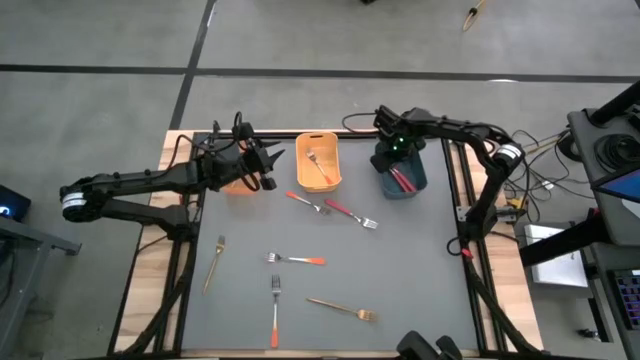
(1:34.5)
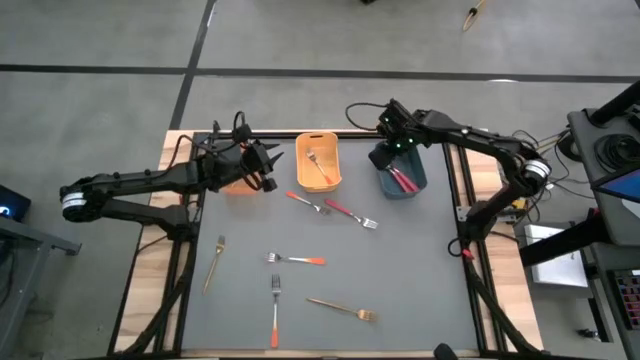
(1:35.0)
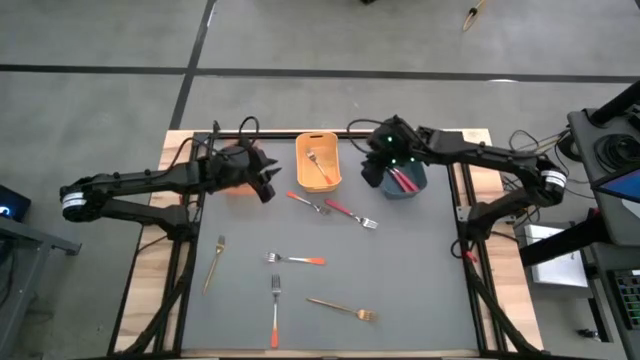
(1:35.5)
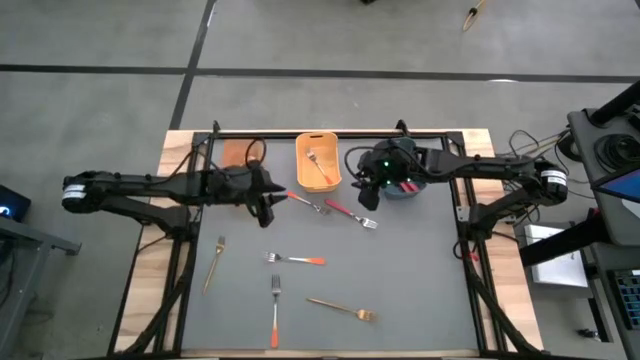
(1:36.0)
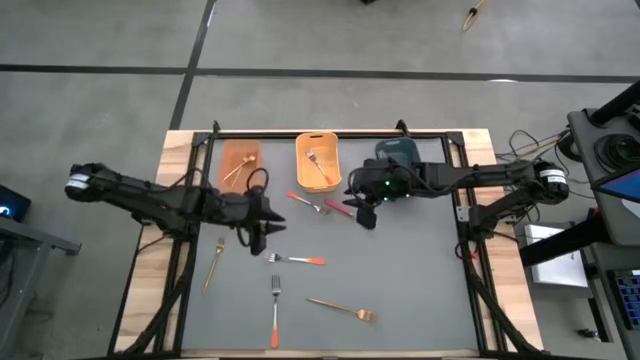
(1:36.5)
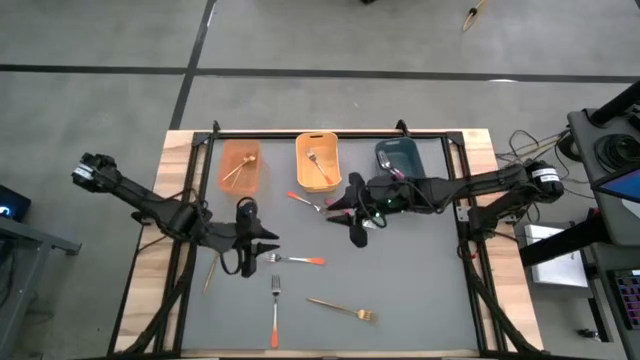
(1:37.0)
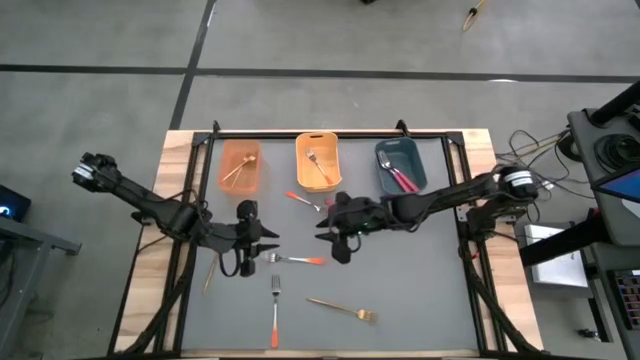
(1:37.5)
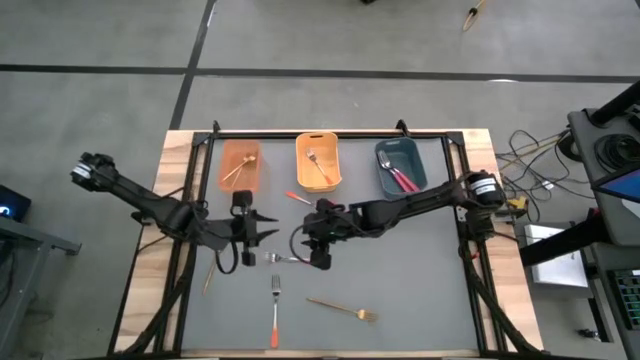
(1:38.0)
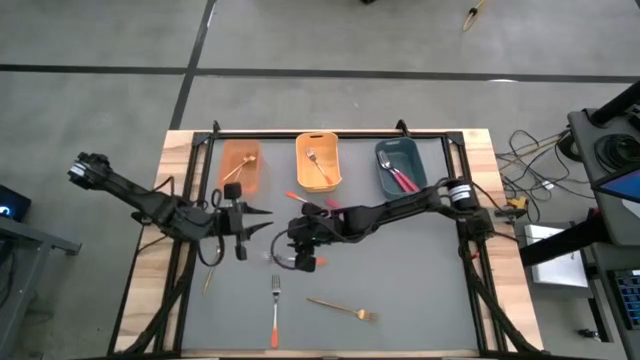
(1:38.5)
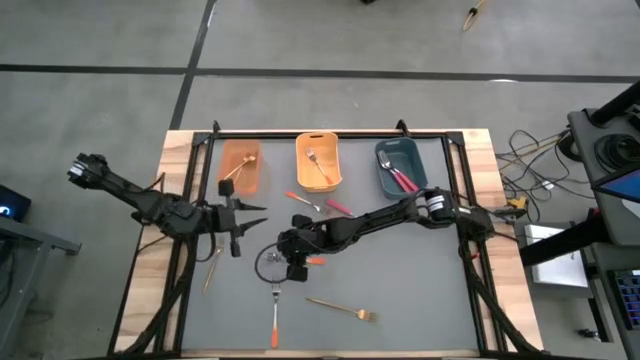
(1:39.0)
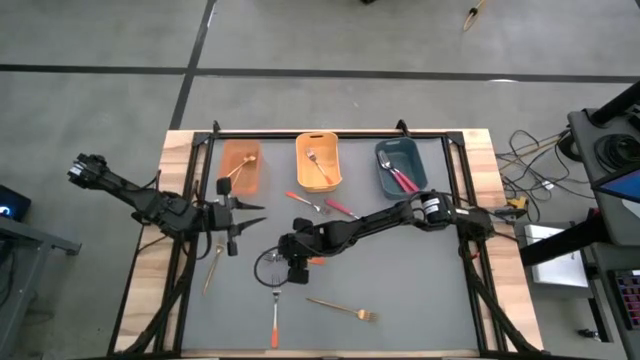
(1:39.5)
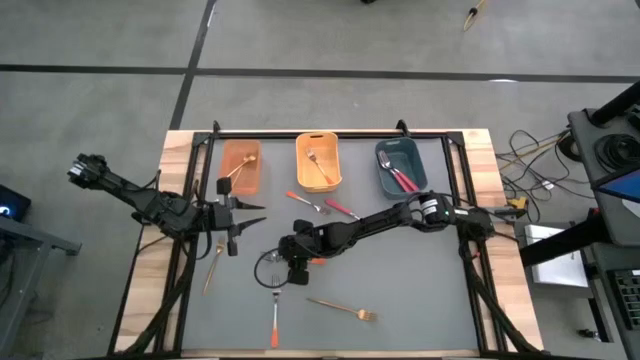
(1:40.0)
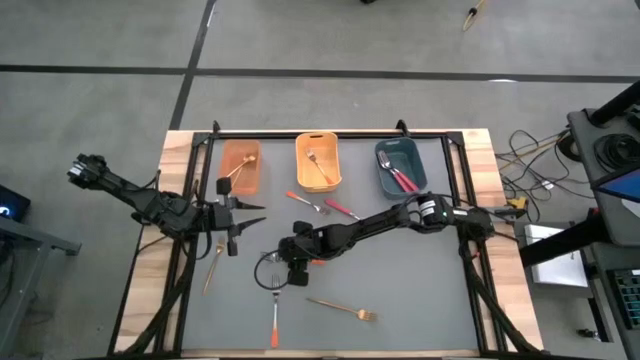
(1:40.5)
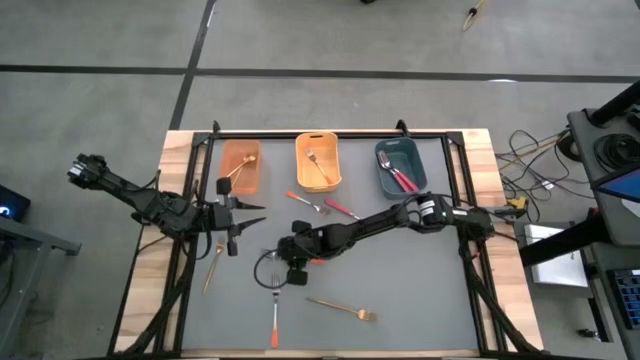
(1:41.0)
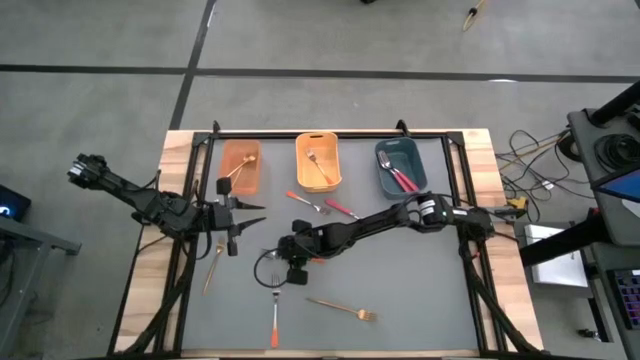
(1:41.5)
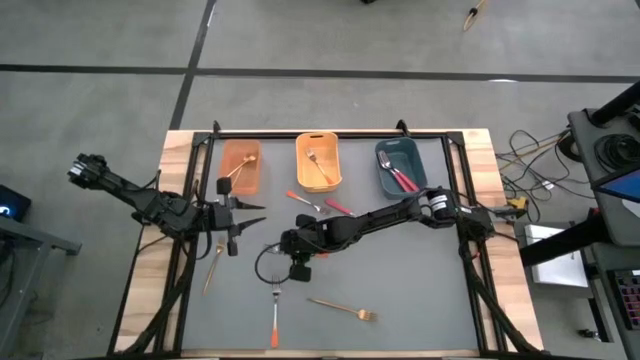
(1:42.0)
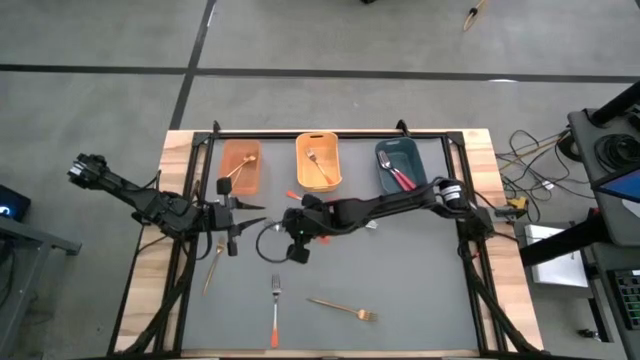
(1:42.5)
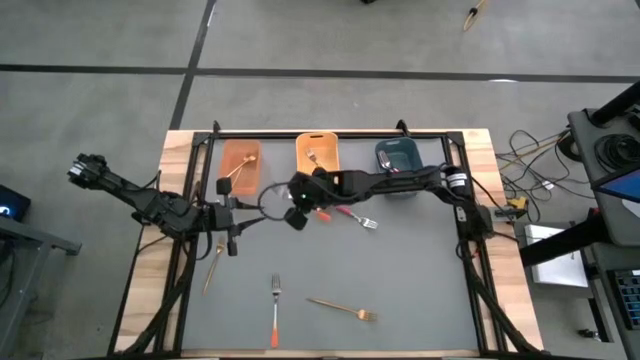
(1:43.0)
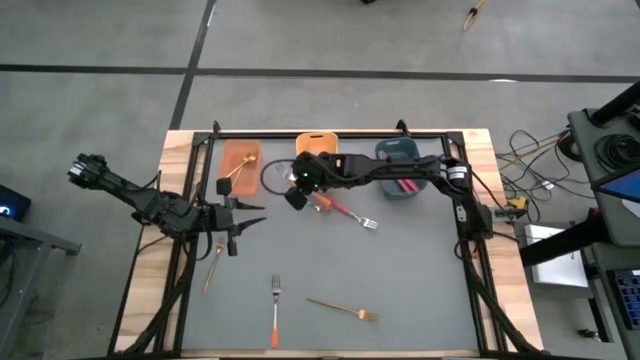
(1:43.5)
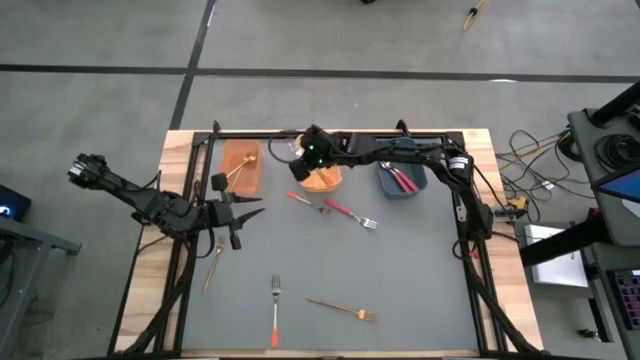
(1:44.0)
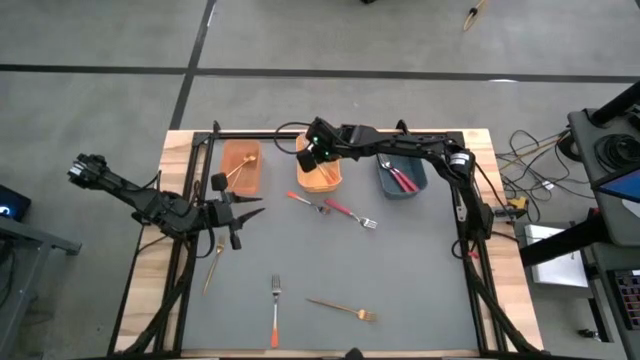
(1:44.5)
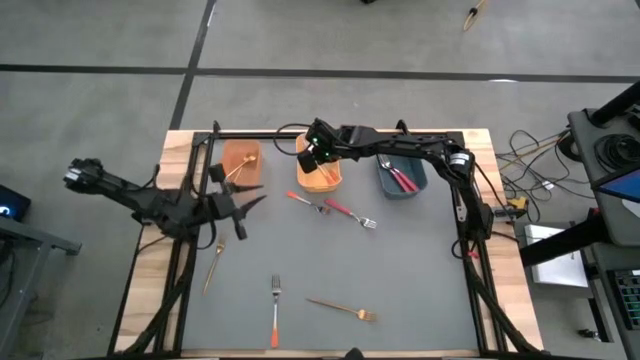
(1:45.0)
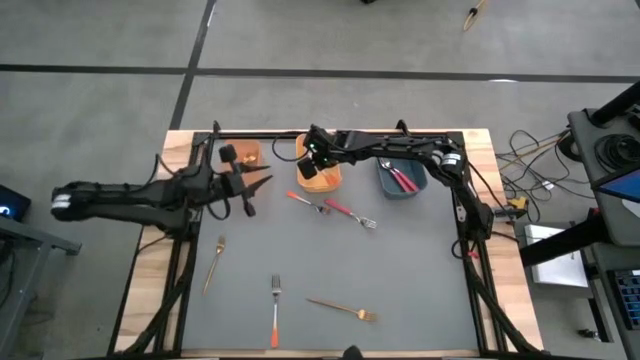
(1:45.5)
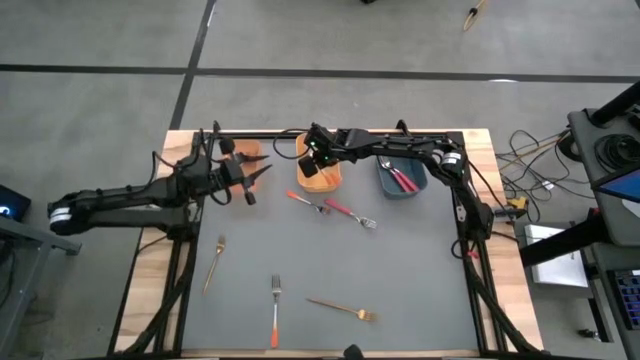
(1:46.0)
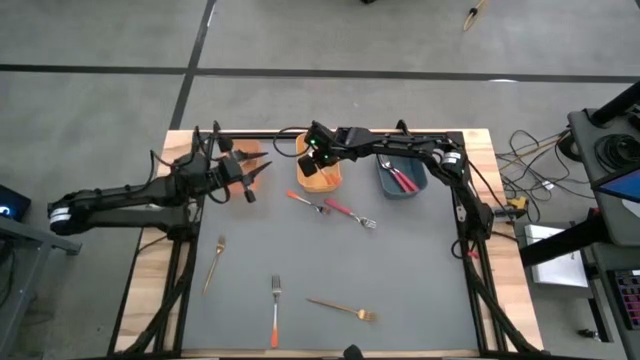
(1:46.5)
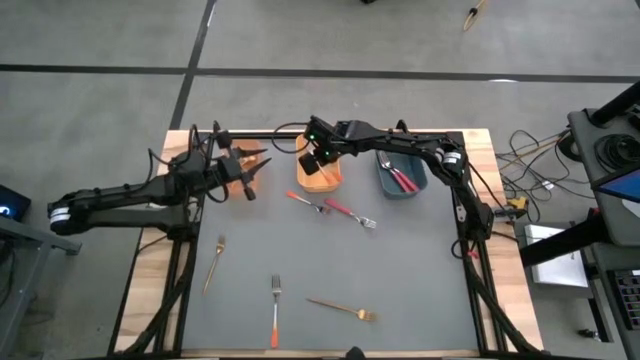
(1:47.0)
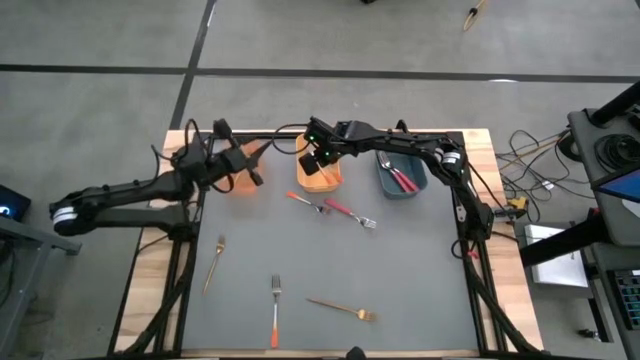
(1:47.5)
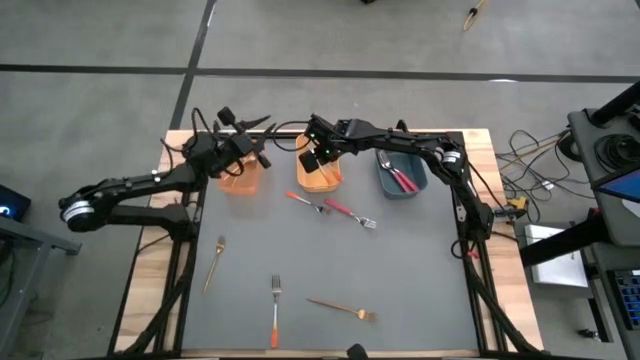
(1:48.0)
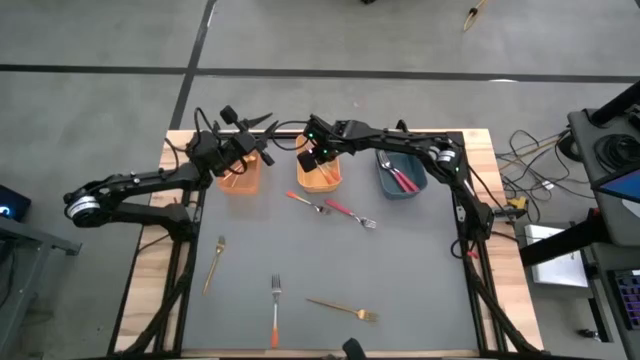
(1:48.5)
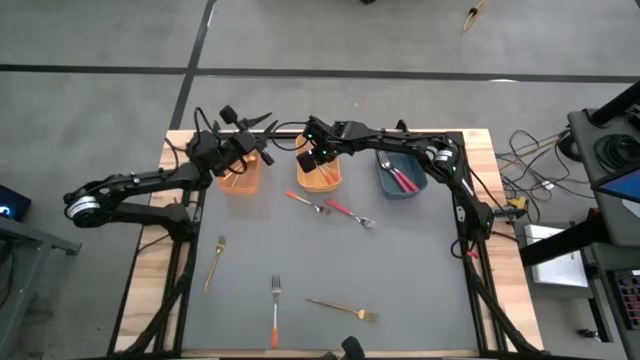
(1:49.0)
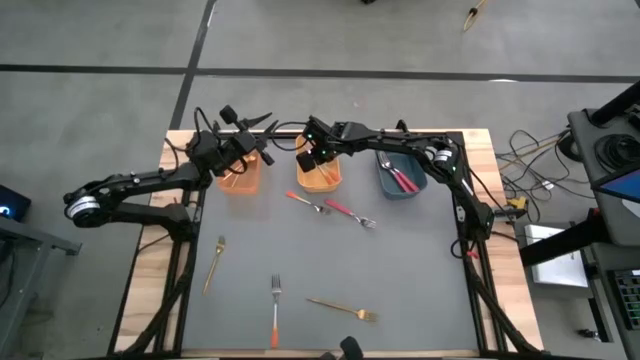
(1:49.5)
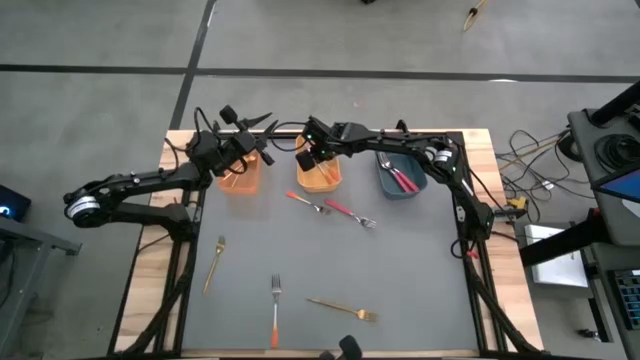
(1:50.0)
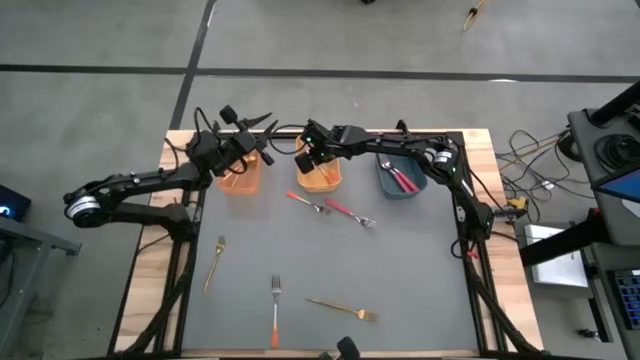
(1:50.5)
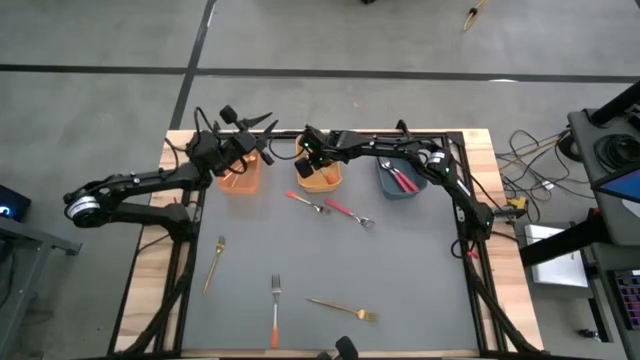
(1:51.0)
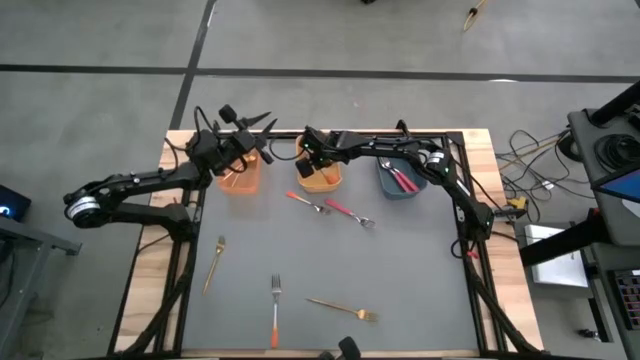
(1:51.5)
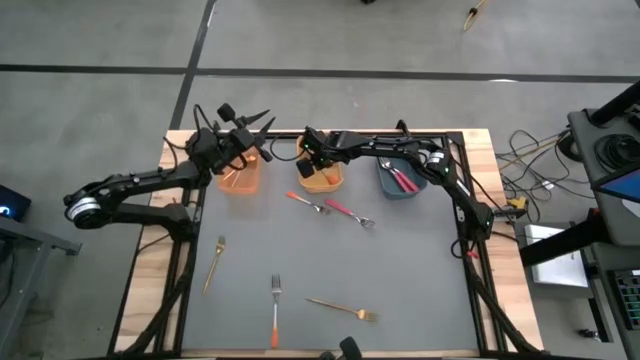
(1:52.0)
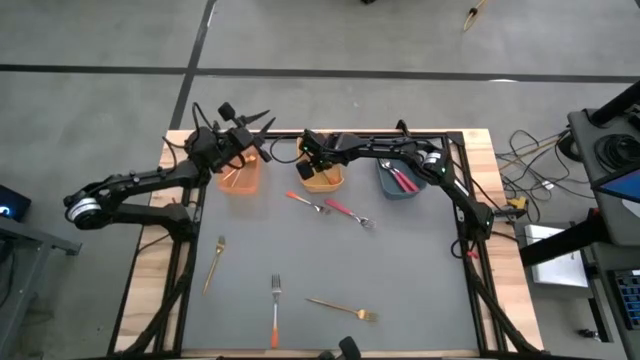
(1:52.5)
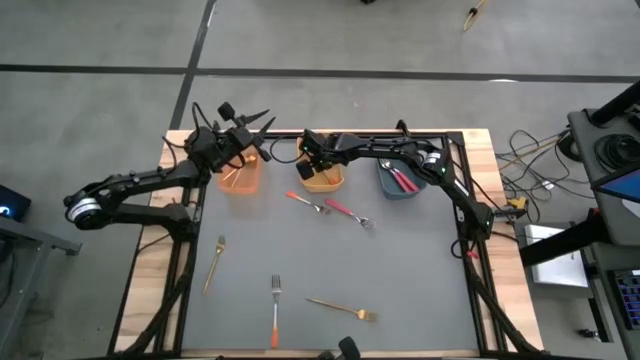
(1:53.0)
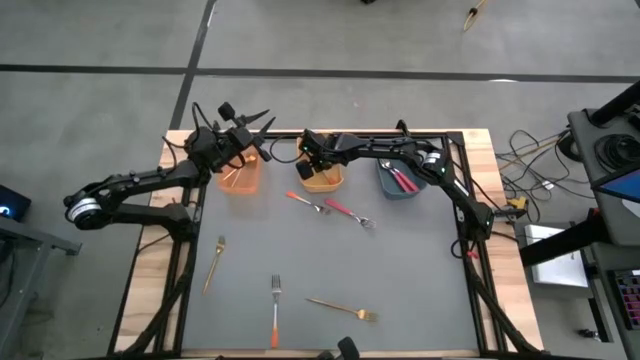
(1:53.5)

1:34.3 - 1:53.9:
Task: Sort silverware by color (type)
Put the orange fork into the yellow bin

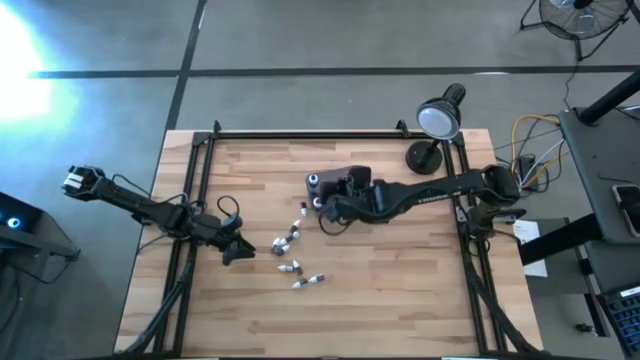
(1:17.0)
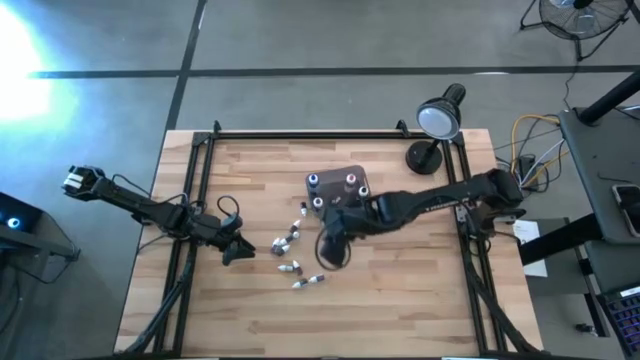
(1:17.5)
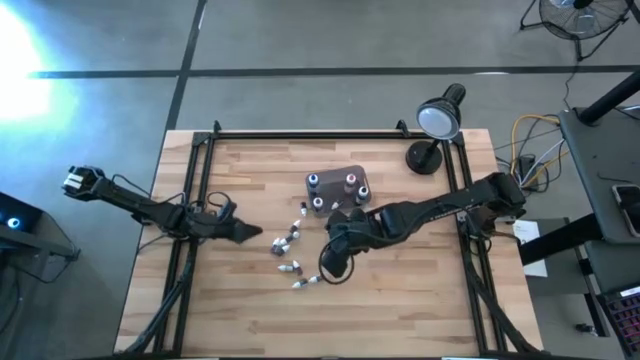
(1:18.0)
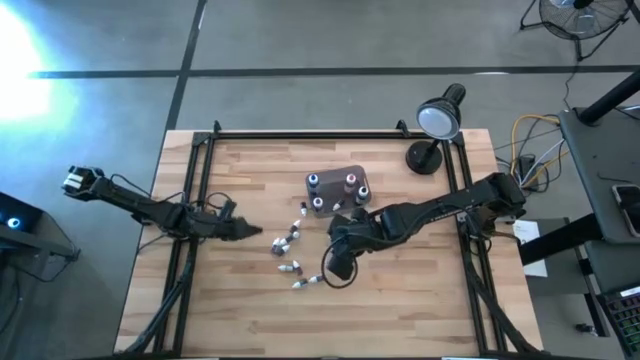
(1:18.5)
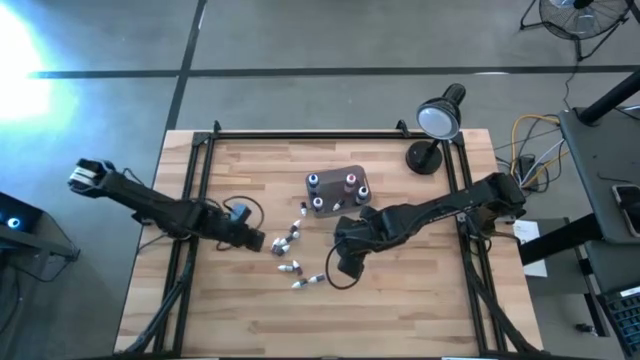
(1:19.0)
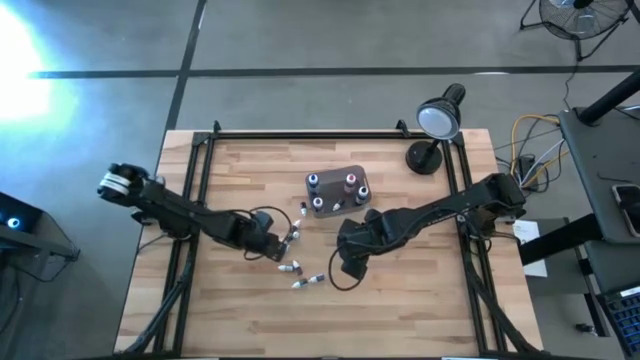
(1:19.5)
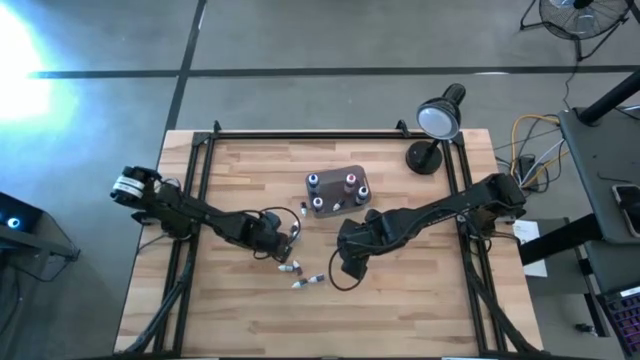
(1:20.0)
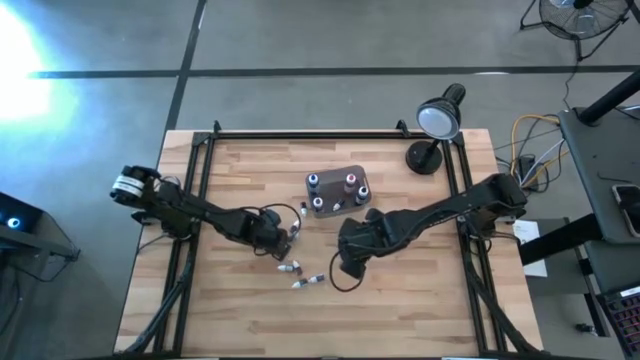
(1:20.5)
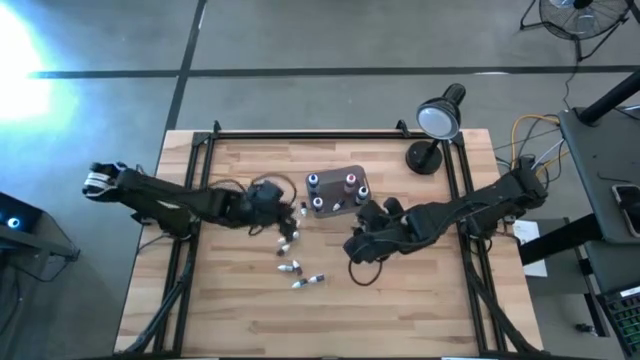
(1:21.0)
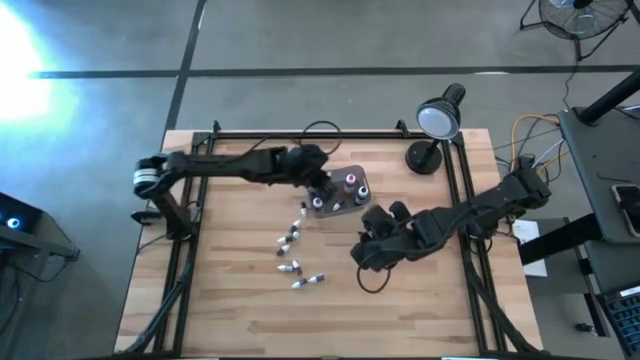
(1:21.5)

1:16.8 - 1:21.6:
Task: Pick & Place food coloring
Put the small purple food coloring bottle into the black transparent bin
